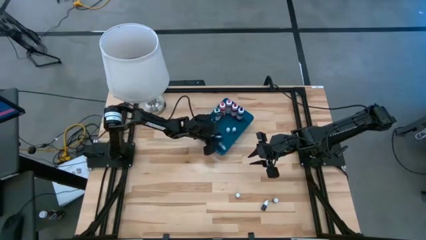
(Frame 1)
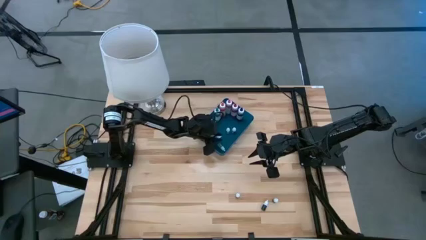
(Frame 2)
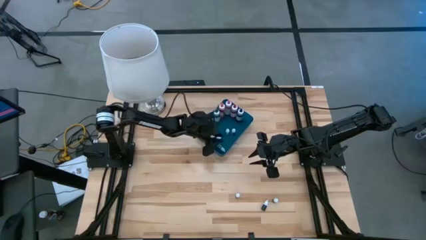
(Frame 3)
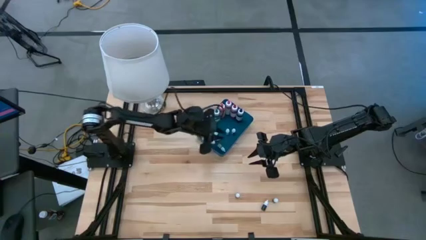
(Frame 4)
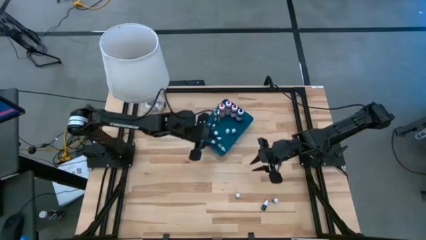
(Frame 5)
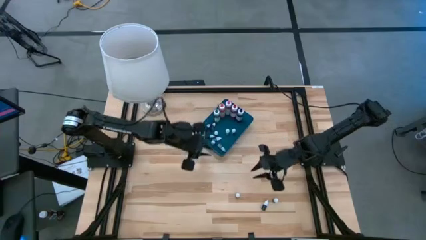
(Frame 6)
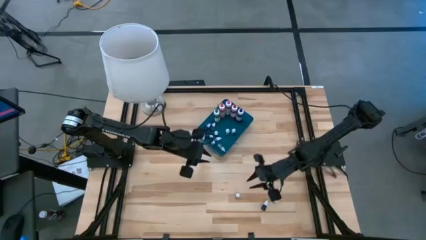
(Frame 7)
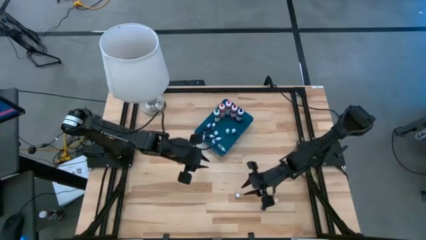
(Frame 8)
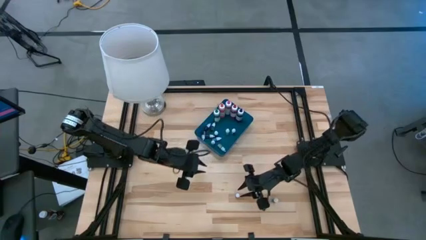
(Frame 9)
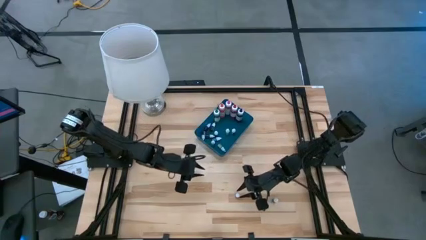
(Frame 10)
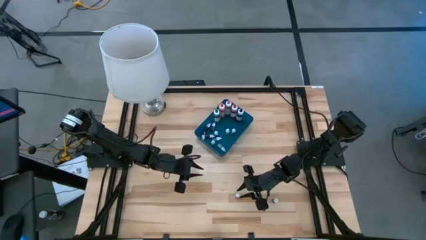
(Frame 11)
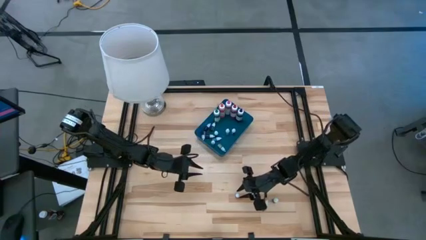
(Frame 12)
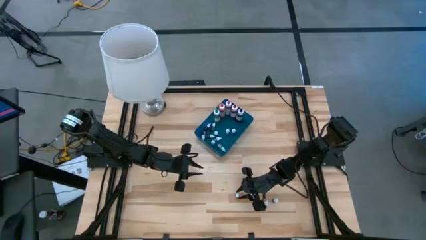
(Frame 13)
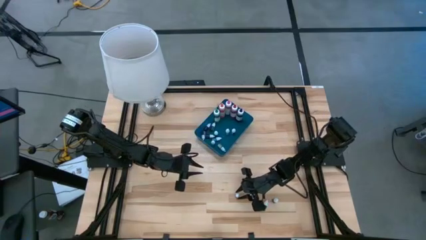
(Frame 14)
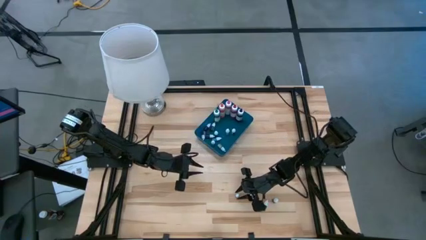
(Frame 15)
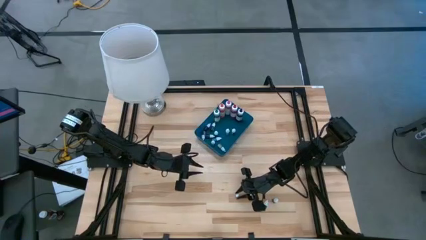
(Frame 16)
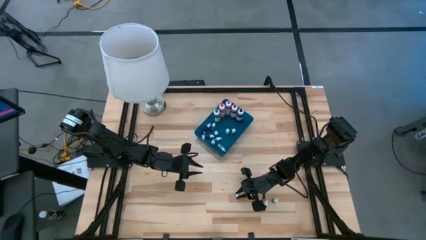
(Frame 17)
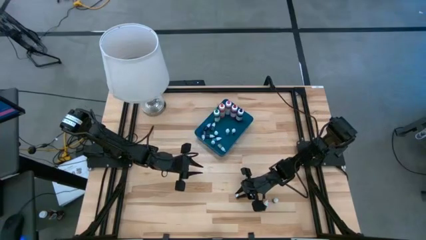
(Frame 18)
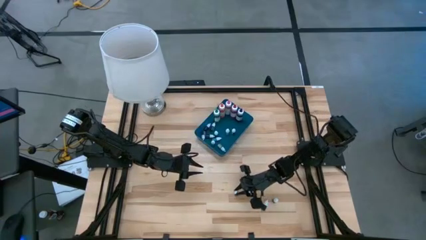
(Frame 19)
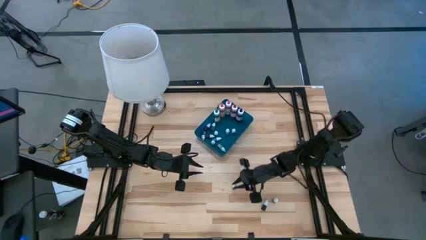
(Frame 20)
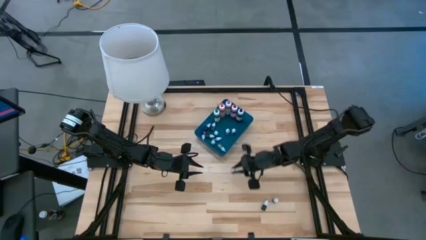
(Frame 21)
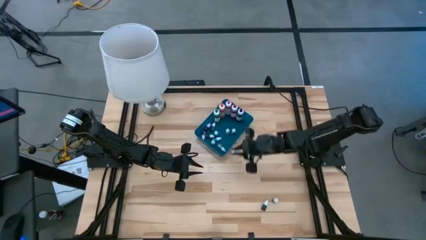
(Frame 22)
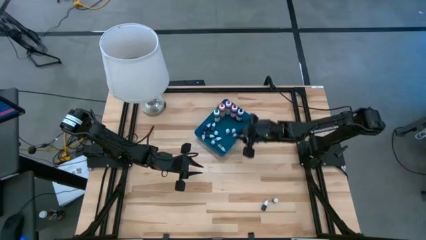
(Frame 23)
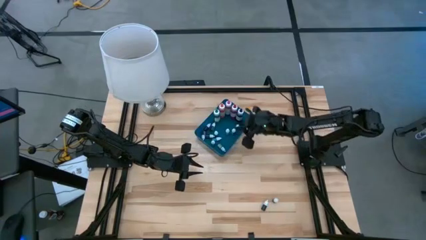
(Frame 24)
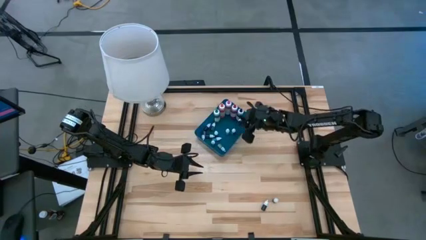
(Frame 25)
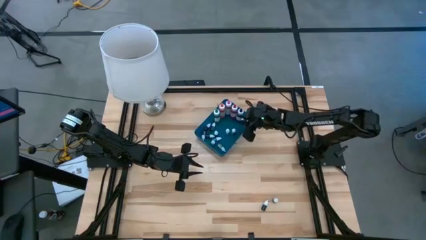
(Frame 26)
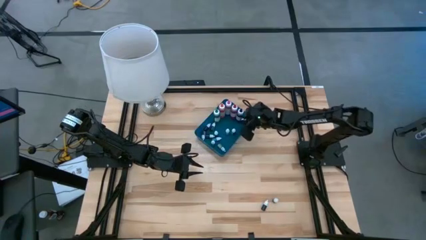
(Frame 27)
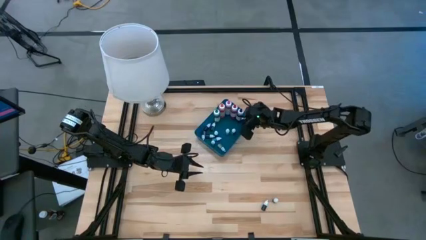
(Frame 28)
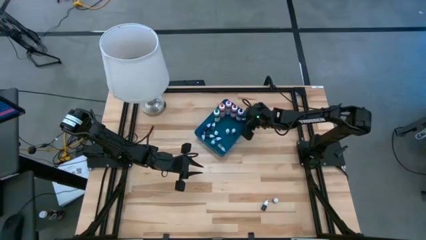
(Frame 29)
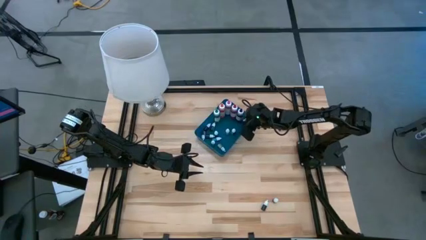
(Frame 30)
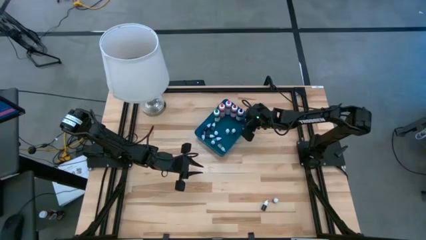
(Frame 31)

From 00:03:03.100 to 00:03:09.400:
Task: Pick & Place food coloring
Put the small black food coloring bottle into the blue container

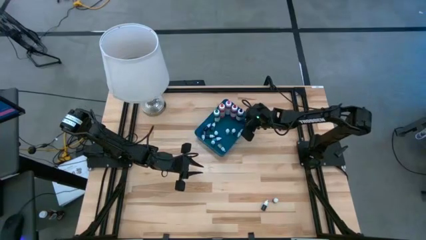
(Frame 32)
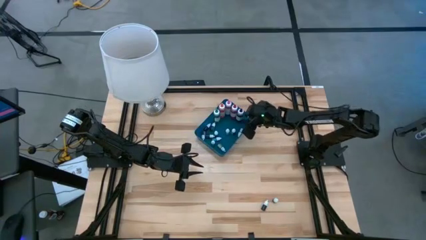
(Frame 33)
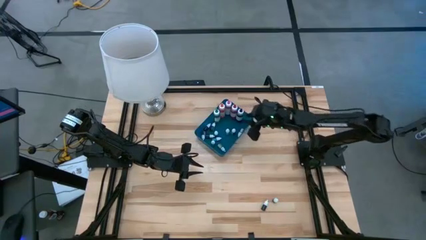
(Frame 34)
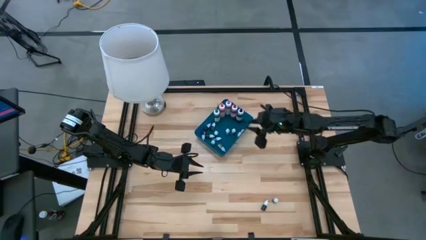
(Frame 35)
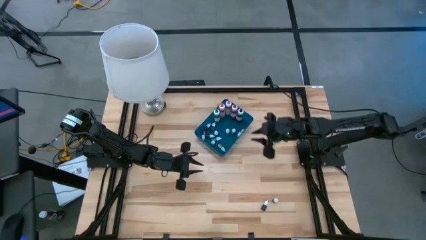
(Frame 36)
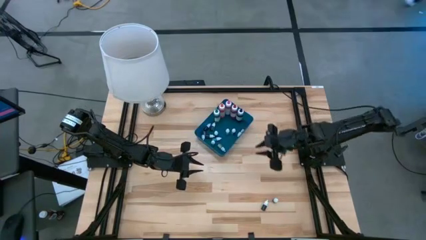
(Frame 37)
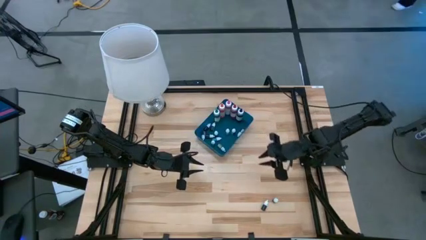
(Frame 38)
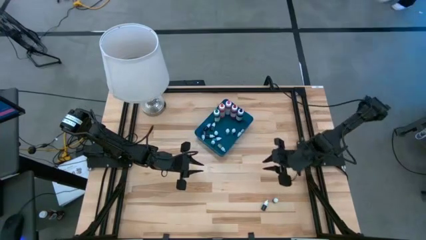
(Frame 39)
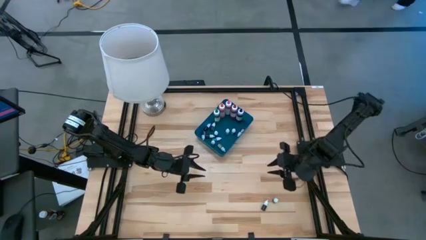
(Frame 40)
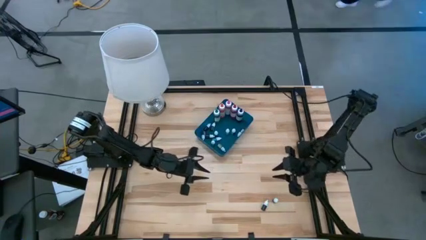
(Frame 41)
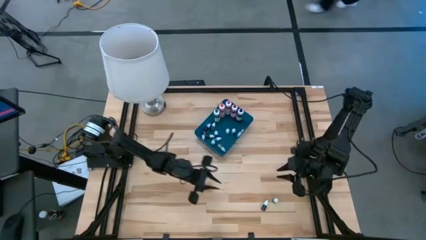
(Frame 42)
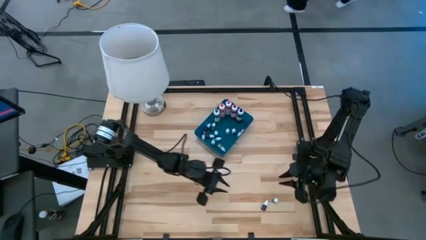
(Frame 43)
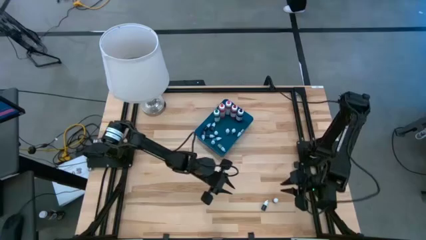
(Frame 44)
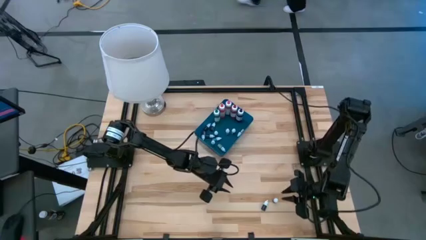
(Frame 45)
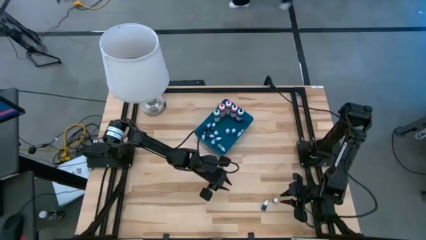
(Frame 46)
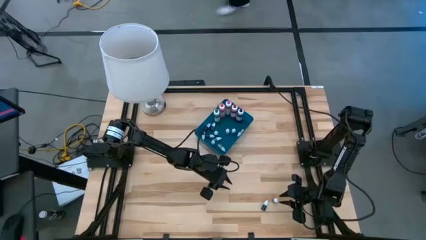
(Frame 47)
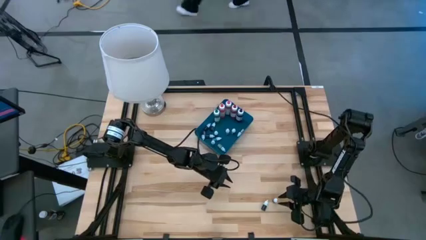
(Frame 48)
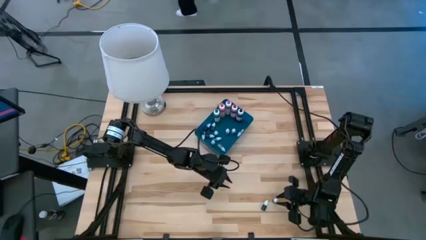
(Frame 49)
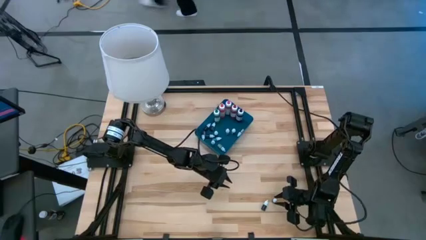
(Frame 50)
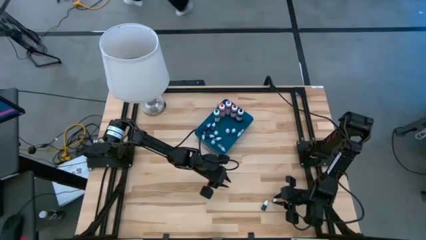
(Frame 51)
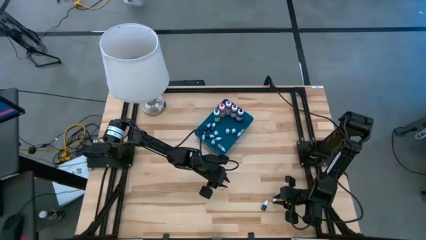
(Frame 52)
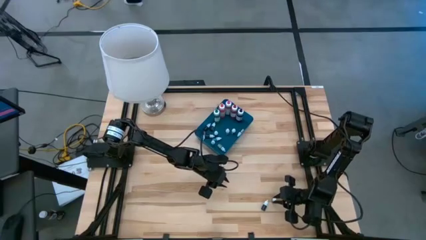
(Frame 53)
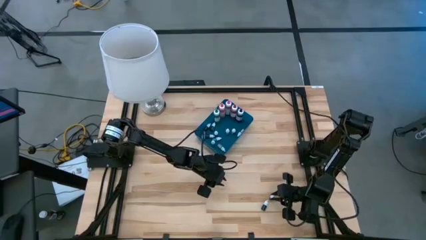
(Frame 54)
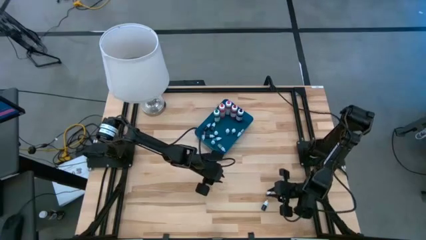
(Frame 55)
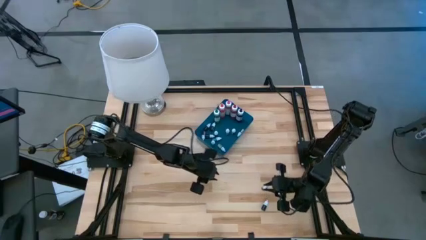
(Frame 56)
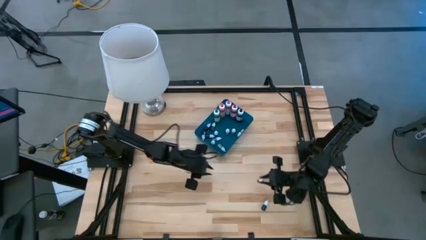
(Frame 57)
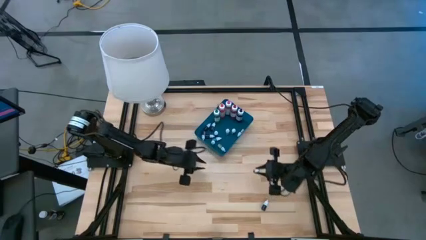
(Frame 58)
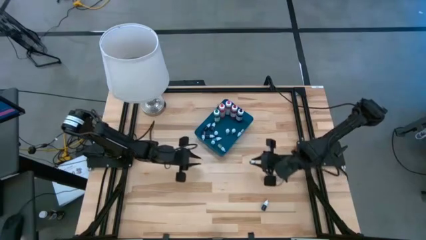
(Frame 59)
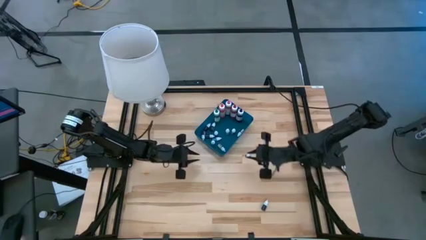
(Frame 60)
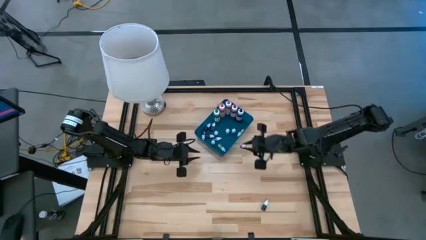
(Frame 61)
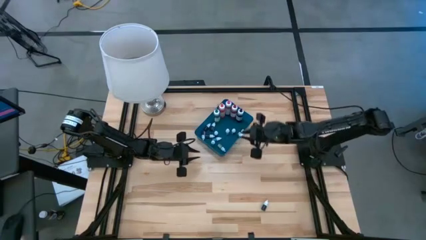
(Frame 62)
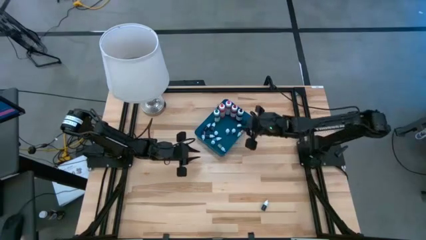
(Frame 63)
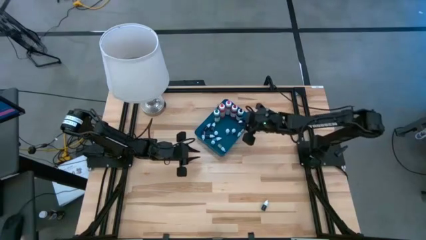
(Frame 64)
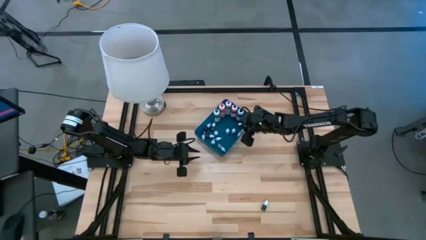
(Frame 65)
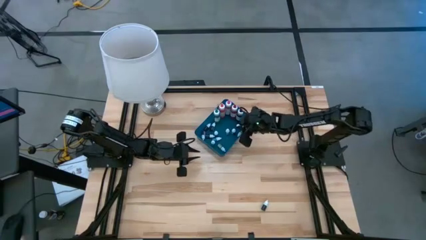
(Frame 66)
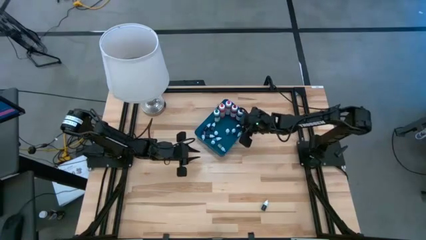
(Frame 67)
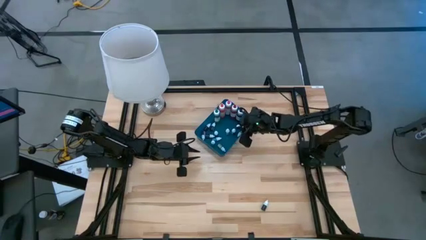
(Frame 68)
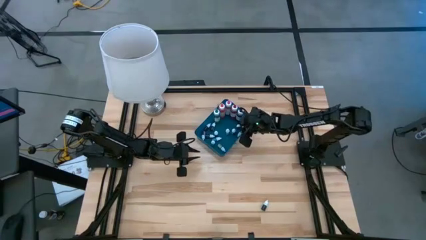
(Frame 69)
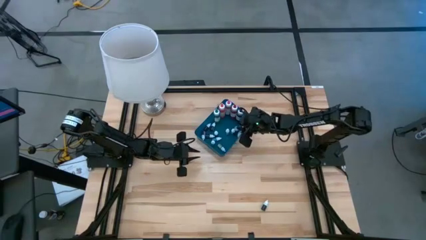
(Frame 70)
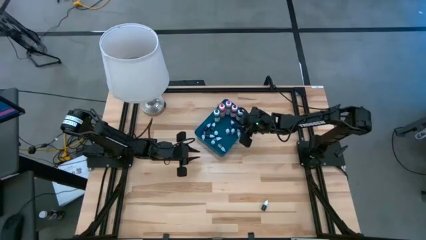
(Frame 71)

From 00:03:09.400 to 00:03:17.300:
Put the small green food coloring bottle into the blue container

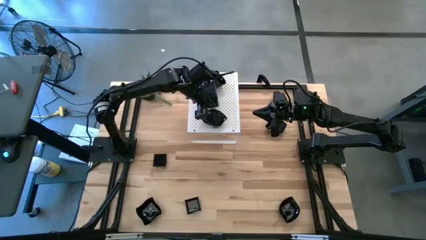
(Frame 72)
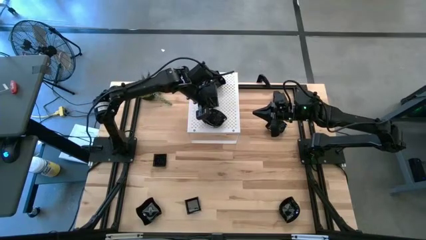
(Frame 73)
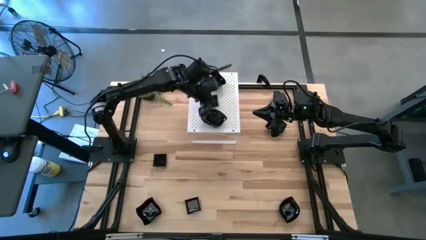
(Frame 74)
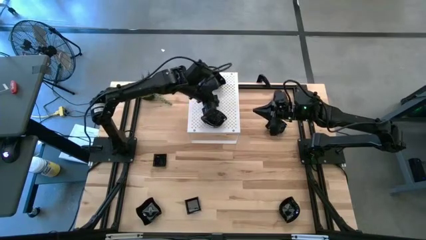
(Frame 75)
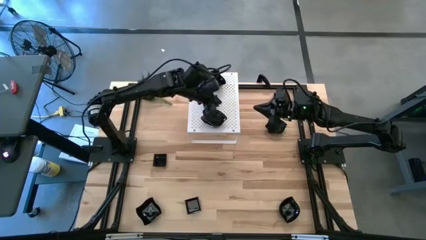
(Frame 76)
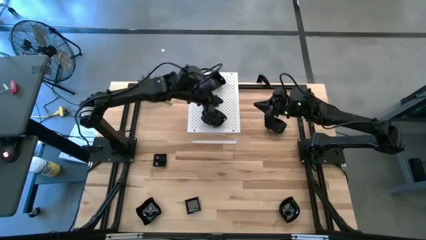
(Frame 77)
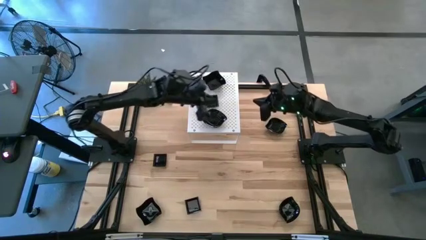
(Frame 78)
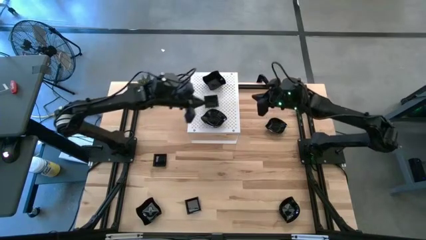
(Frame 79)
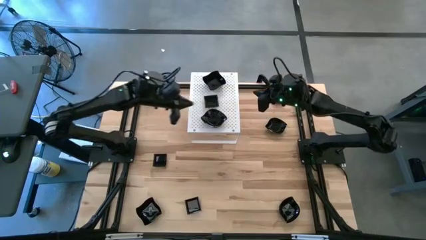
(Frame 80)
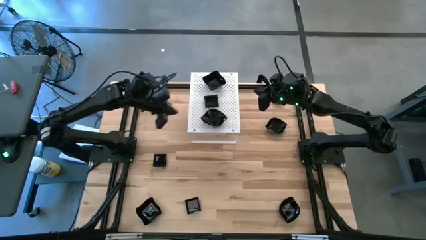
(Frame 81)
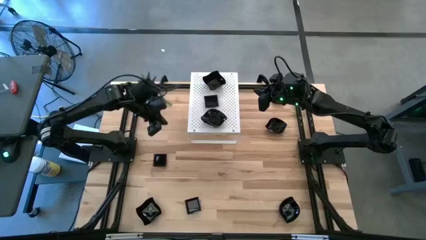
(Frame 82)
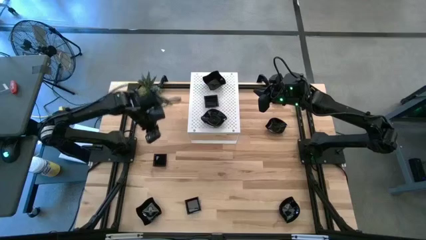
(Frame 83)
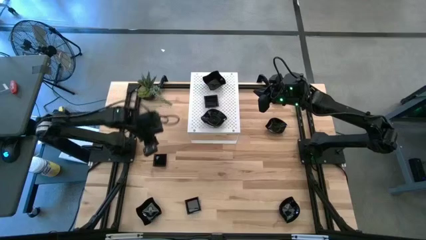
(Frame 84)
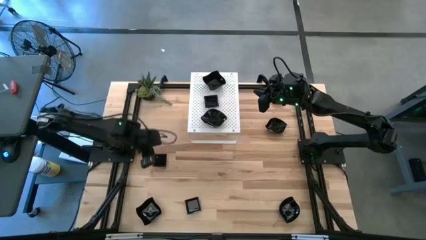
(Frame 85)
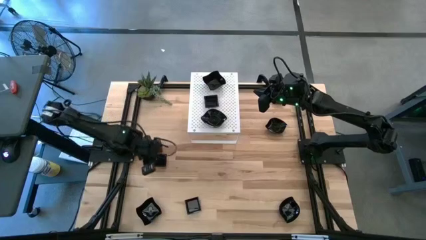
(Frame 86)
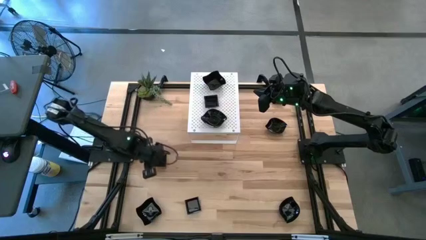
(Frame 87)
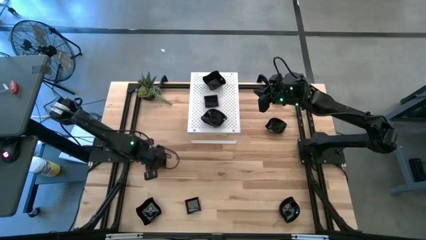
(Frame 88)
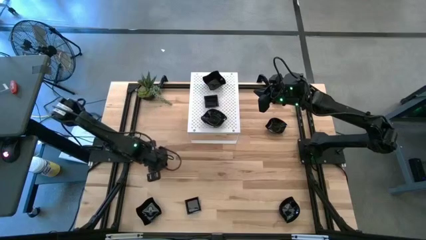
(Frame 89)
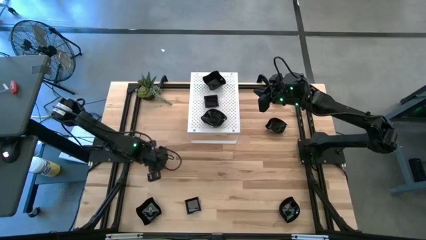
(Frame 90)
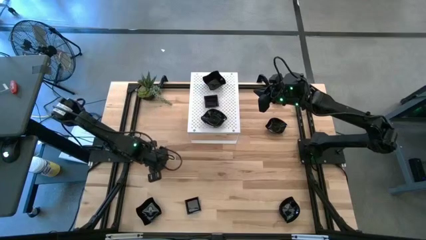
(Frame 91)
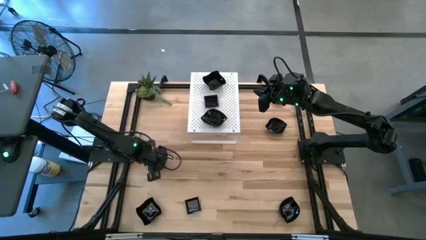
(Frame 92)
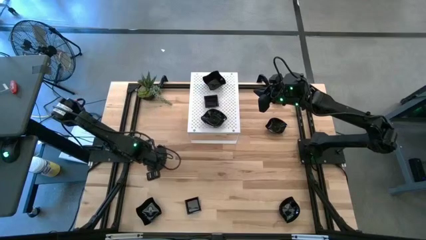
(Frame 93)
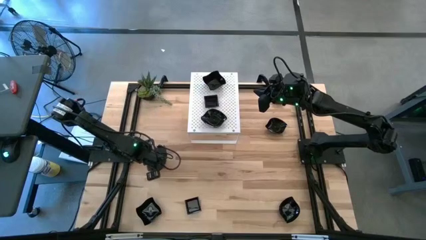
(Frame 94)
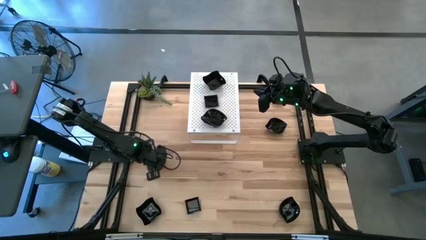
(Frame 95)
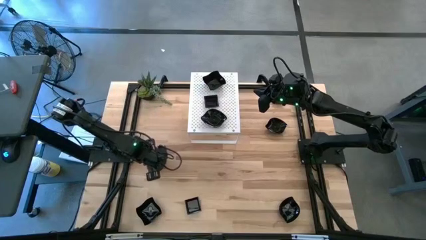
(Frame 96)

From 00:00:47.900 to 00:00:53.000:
Task: Pick & Place Mini shaped plates
Stack the black square plate on top of the black square plate on the shelf
